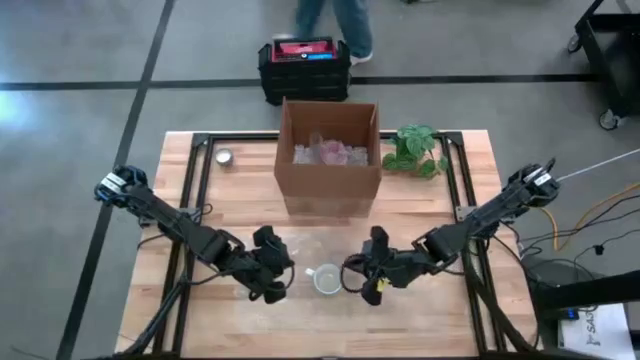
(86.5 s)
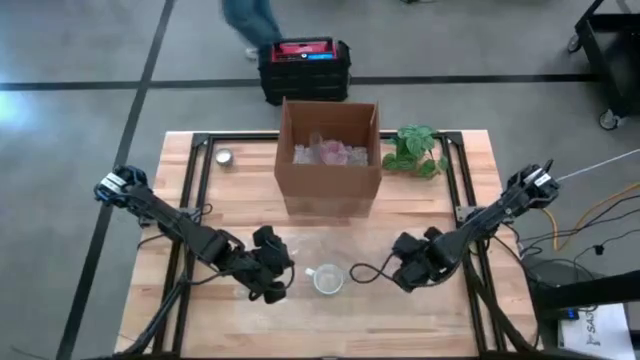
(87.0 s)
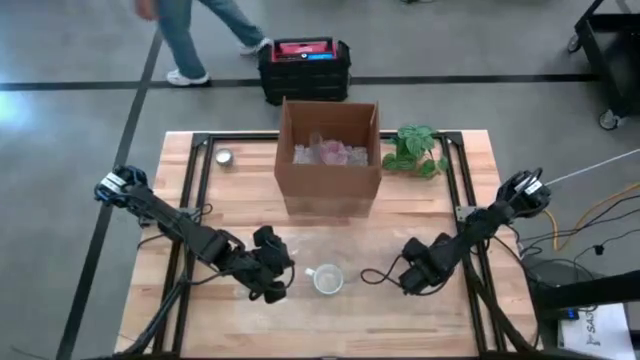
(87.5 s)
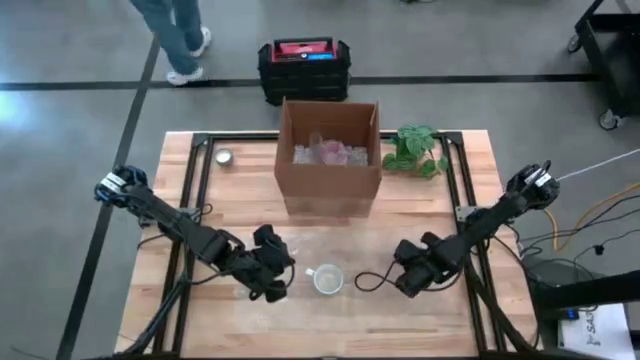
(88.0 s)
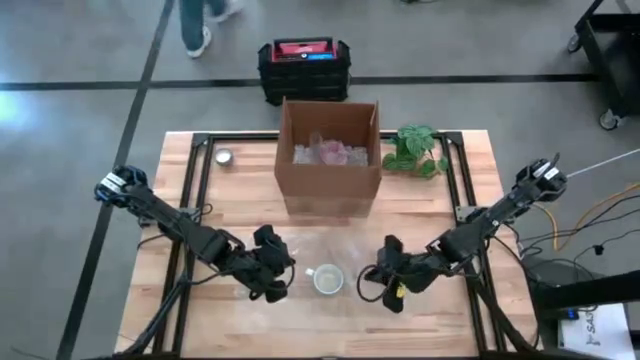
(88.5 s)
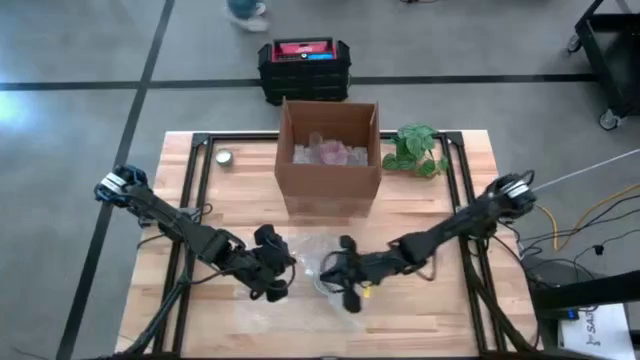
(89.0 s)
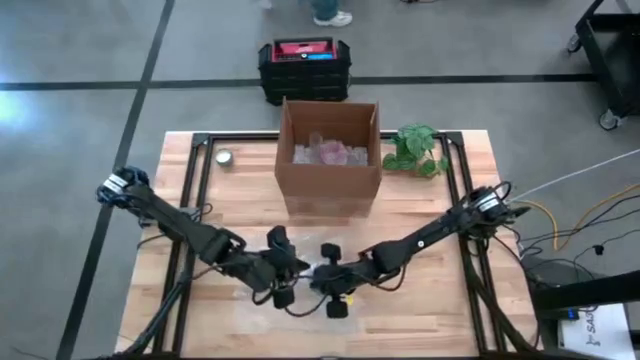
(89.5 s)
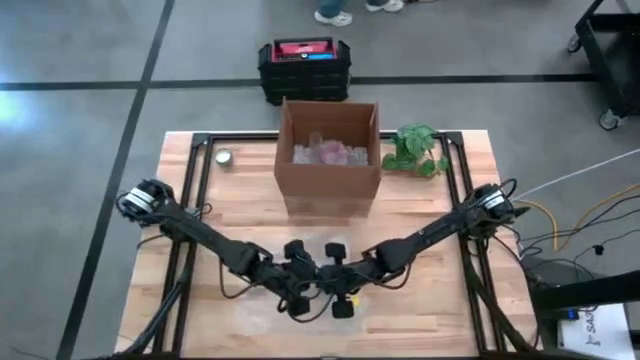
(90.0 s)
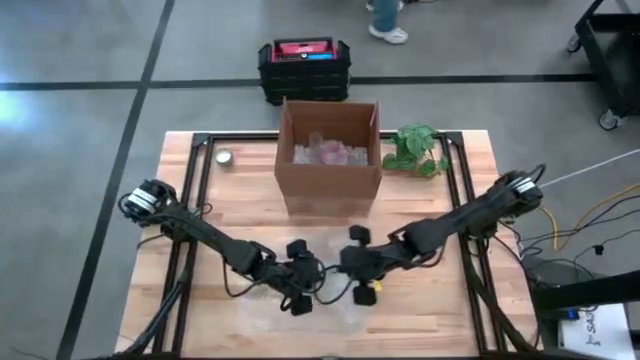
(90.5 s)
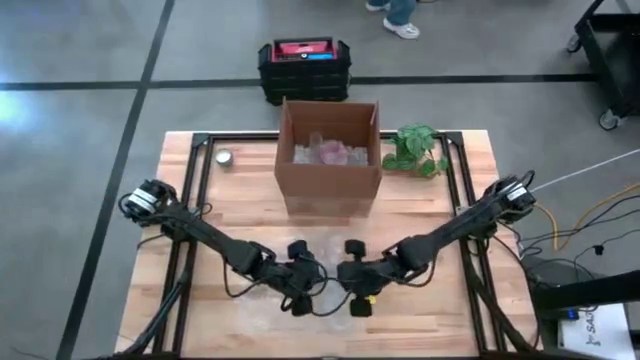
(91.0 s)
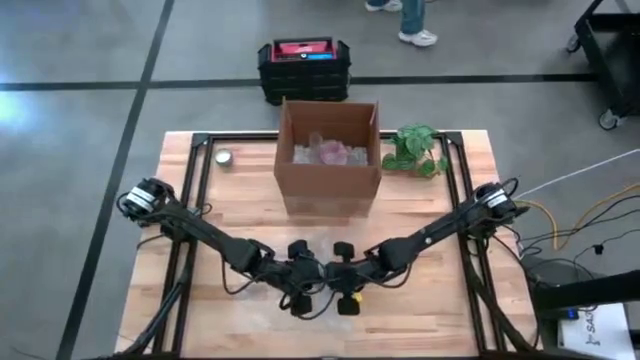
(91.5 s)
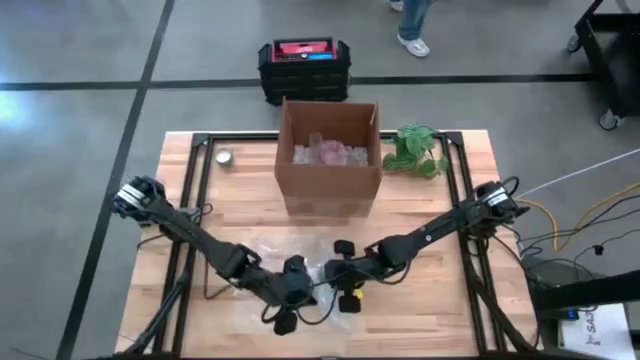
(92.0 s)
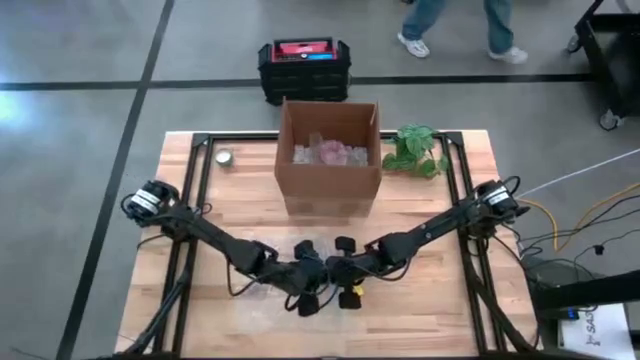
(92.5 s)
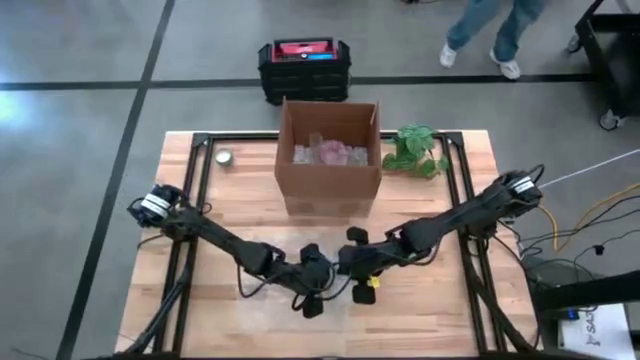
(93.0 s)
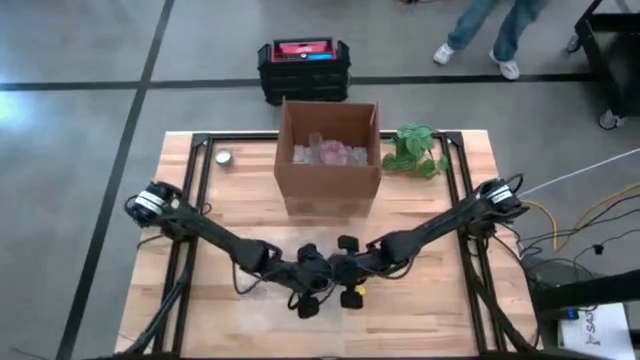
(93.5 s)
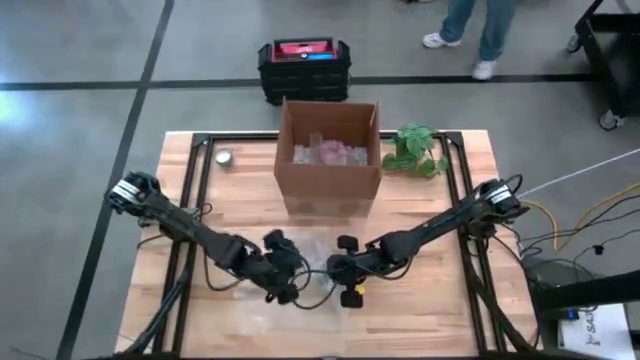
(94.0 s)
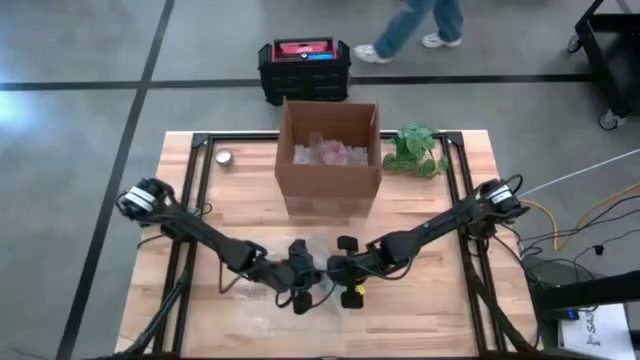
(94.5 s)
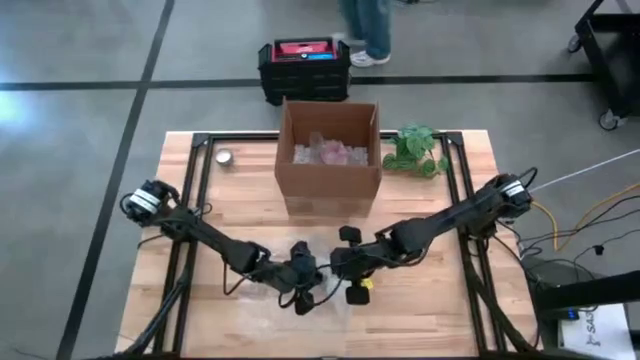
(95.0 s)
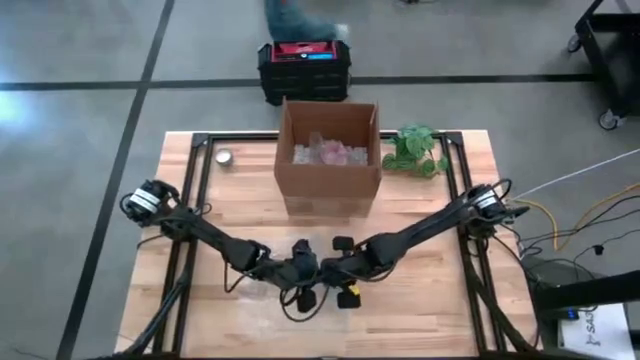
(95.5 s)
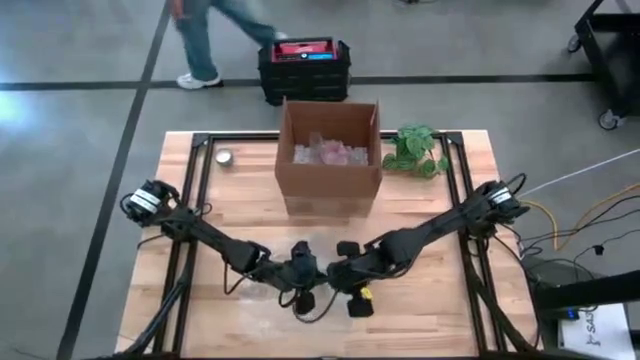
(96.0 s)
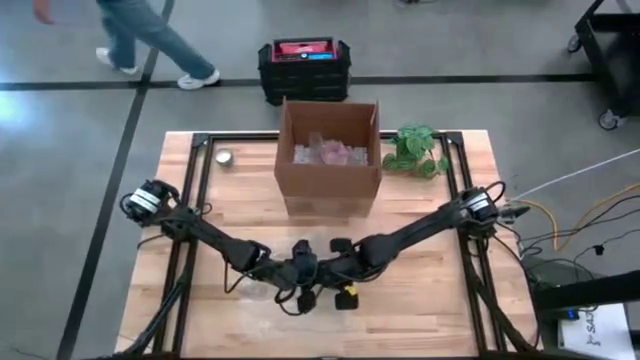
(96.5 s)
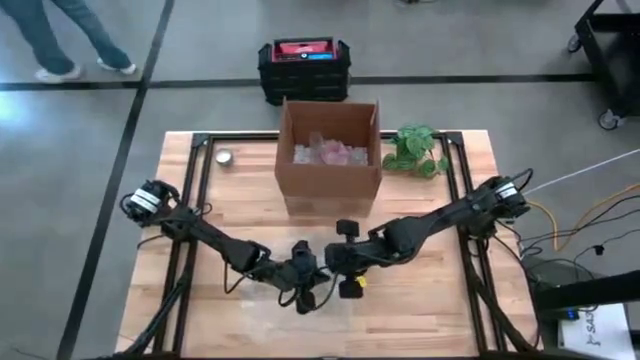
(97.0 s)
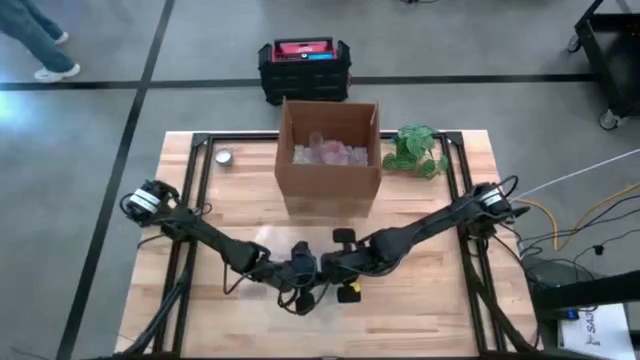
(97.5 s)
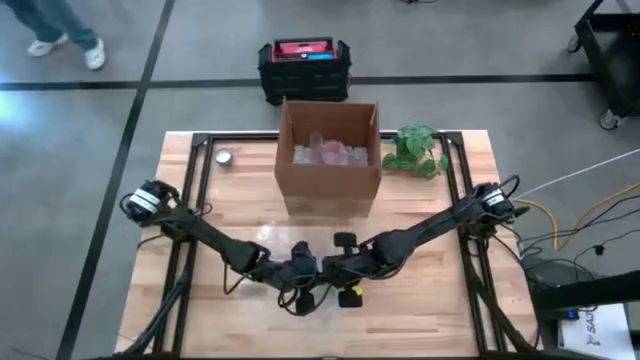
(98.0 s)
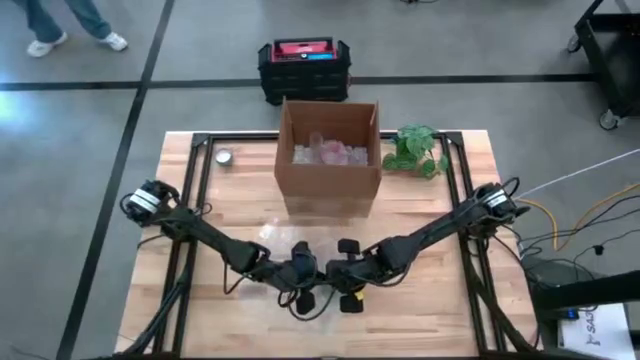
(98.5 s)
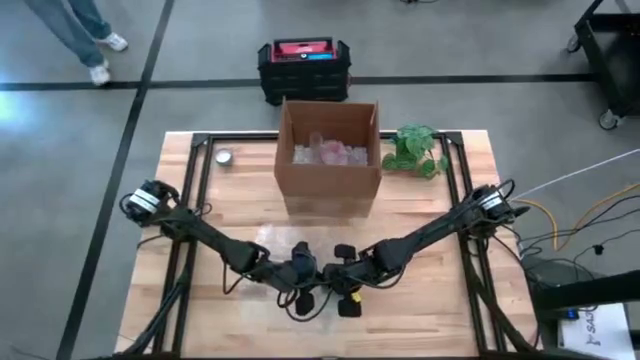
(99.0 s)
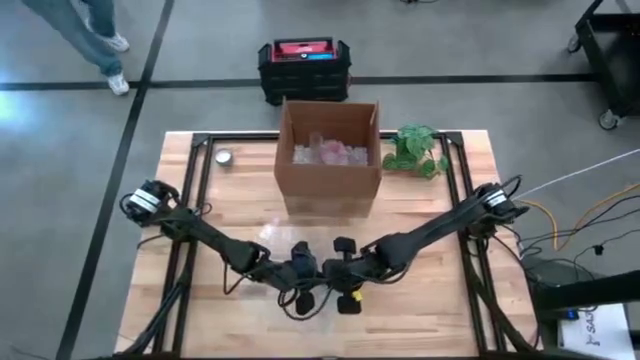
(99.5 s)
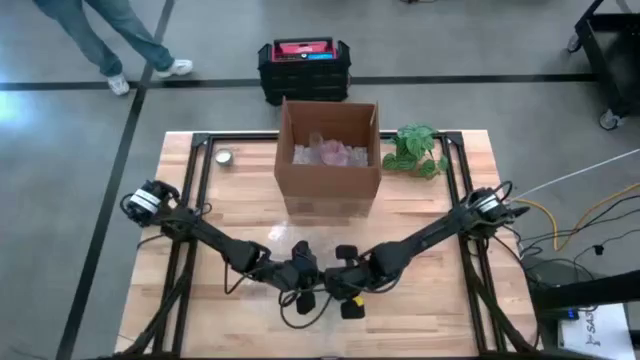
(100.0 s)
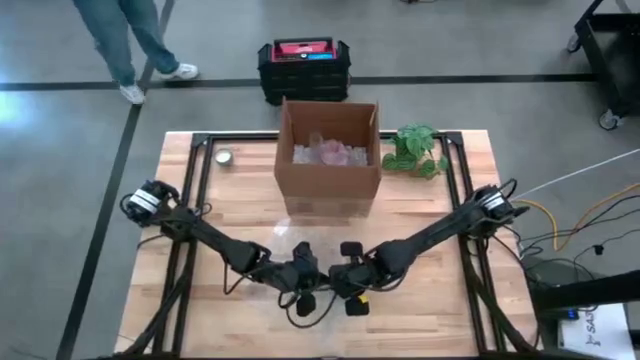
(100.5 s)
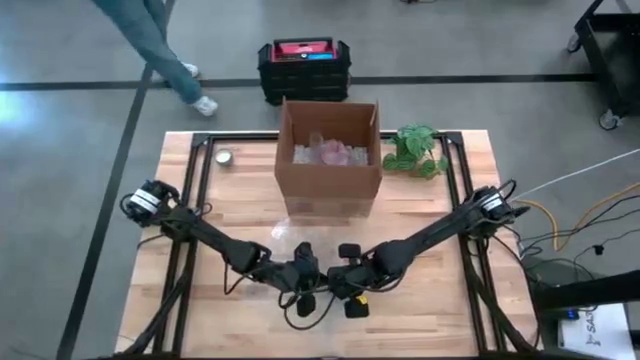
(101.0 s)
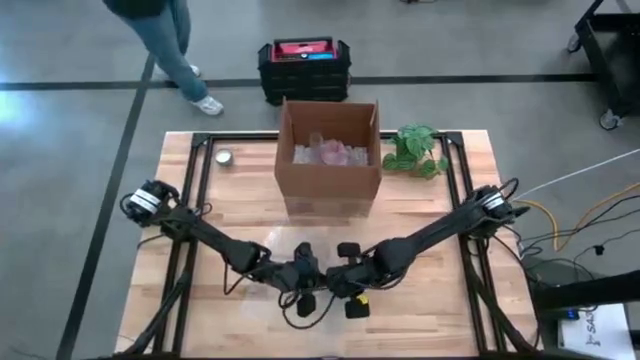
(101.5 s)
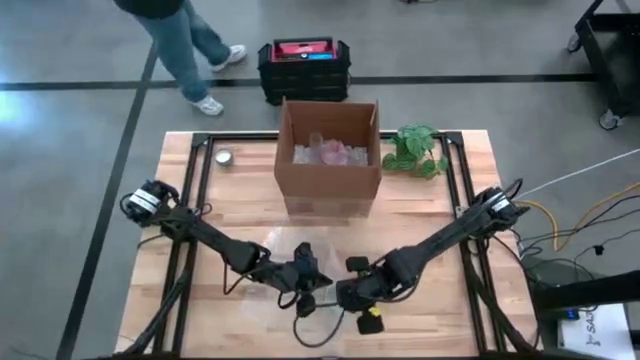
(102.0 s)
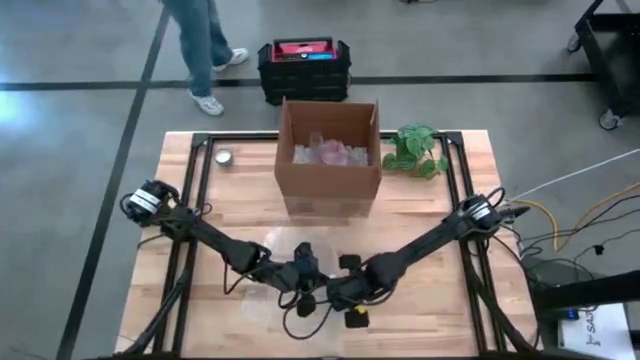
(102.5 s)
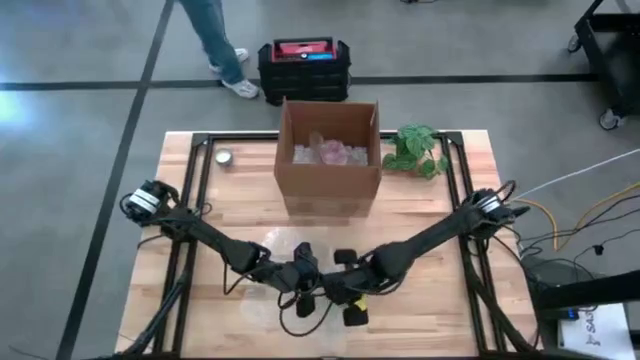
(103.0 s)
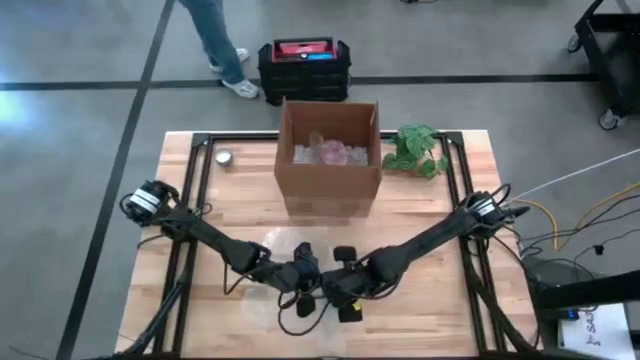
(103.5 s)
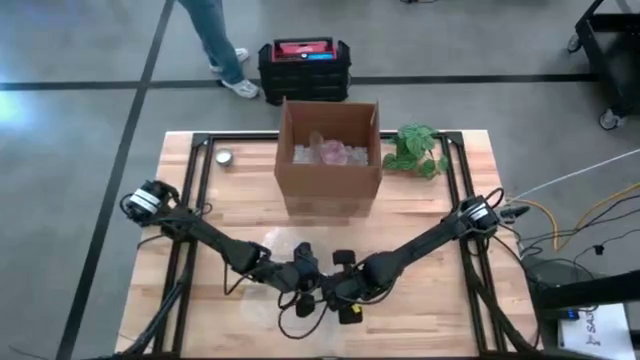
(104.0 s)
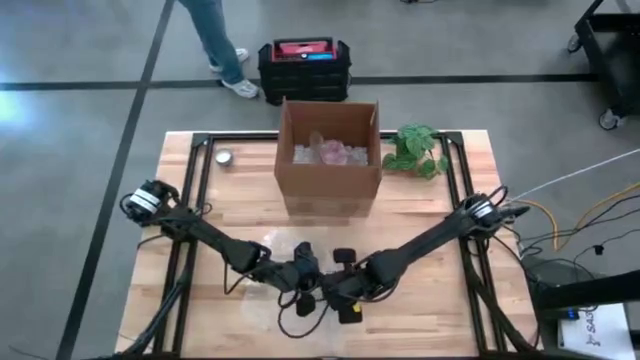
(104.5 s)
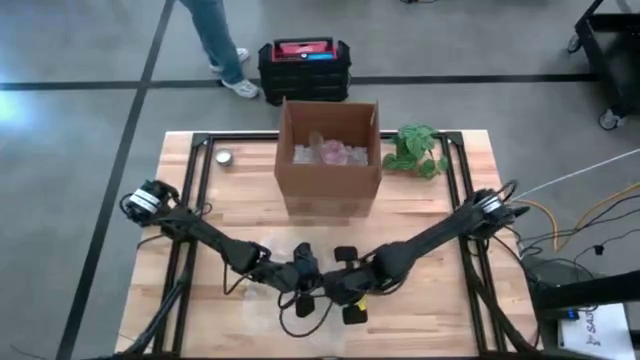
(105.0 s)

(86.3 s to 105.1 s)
Task: wrap mug
Wrap the white mug in bubble wrap

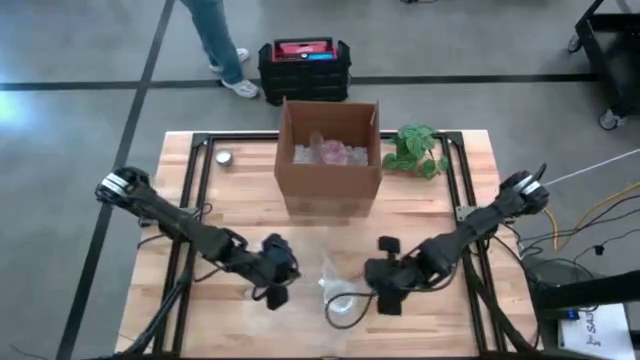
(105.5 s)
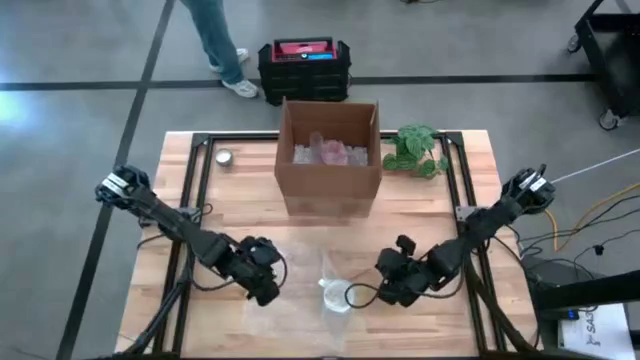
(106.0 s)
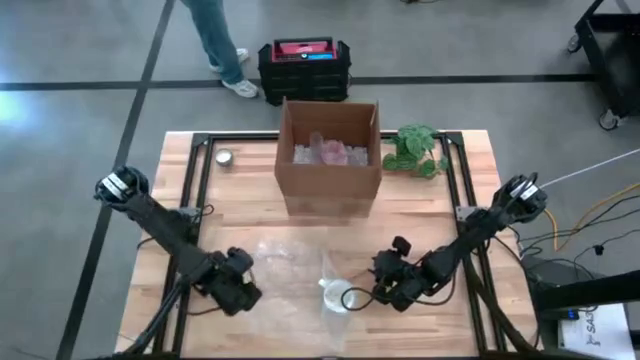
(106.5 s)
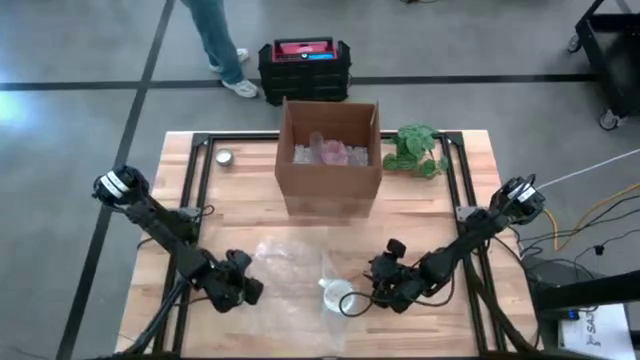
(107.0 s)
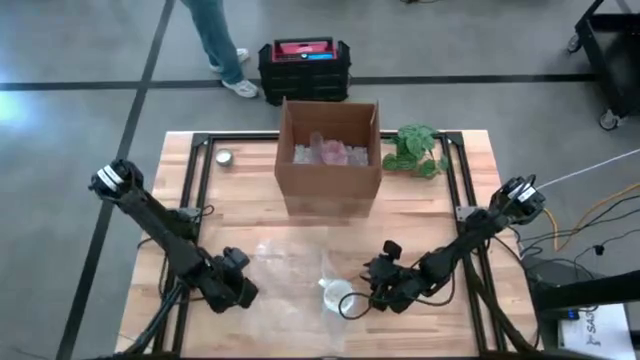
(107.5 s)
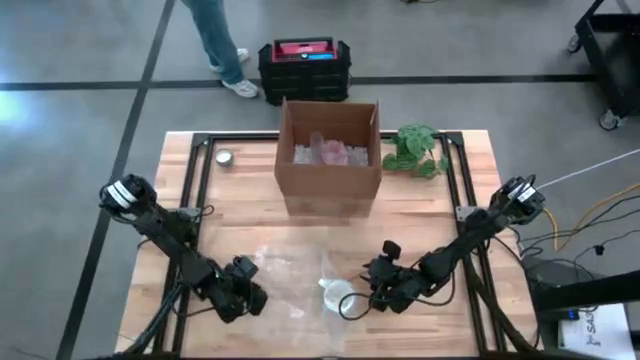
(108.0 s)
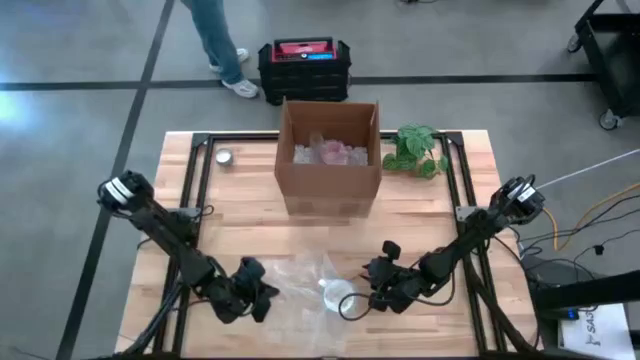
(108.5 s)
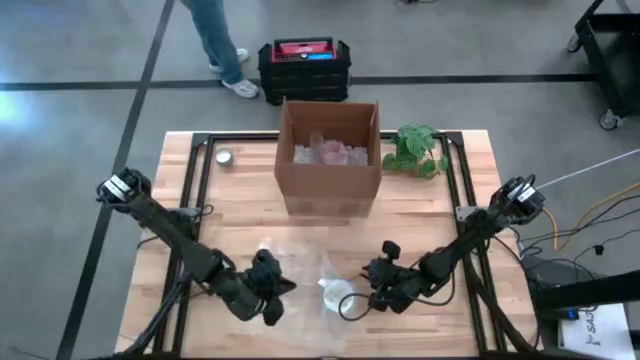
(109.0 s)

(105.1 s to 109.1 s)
Wrap the white mug in bubble wrap
